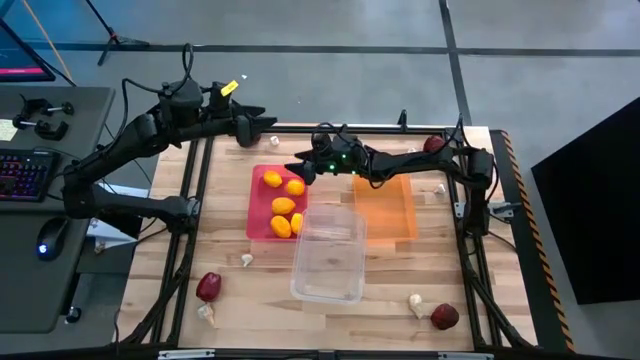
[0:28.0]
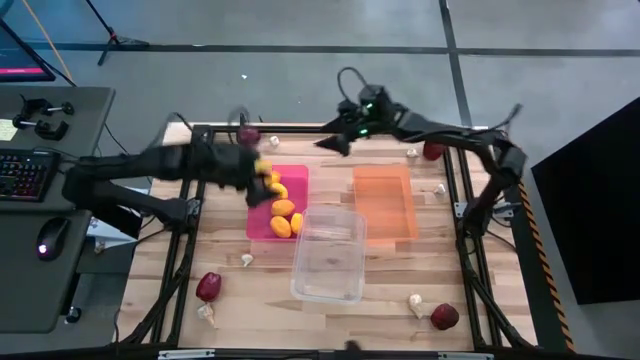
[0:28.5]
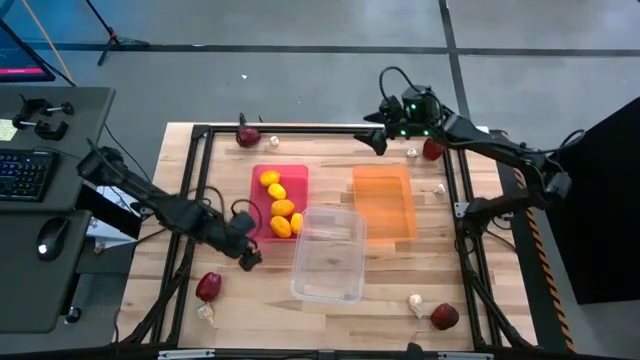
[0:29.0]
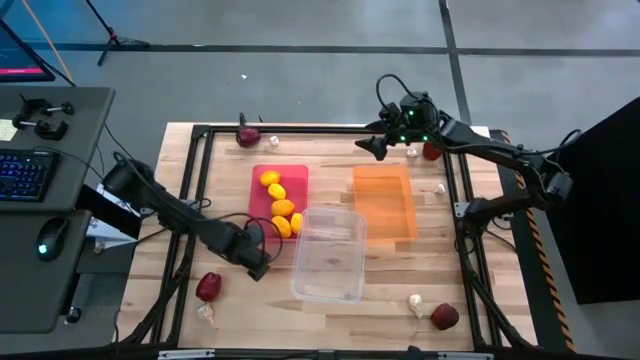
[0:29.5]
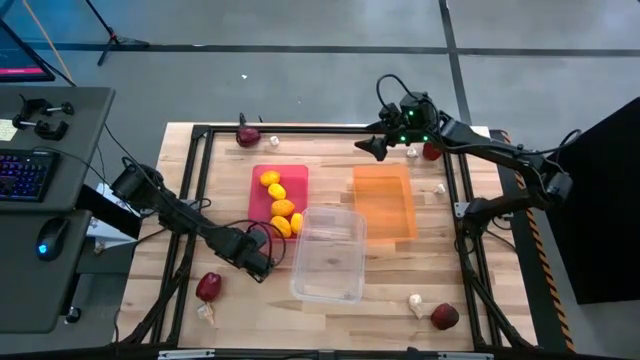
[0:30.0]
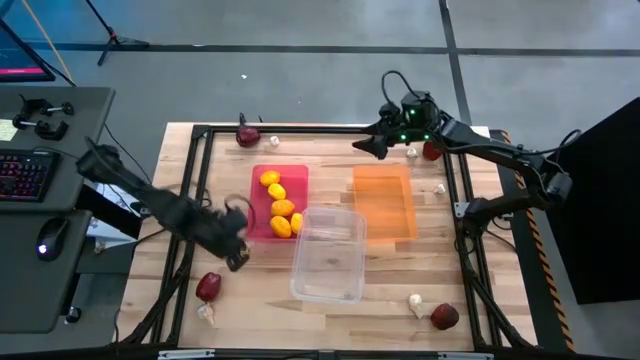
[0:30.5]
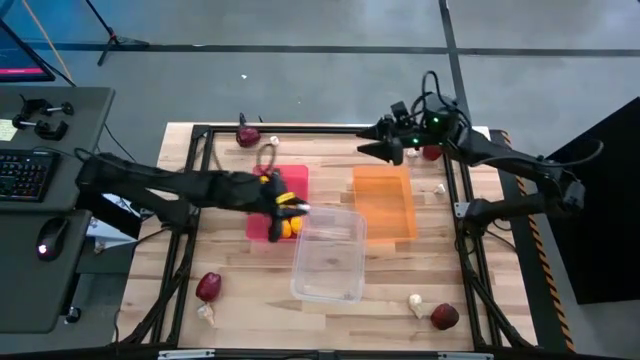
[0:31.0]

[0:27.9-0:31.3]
Task: Sort produce into baskets
Put the garlic into the transparent bin

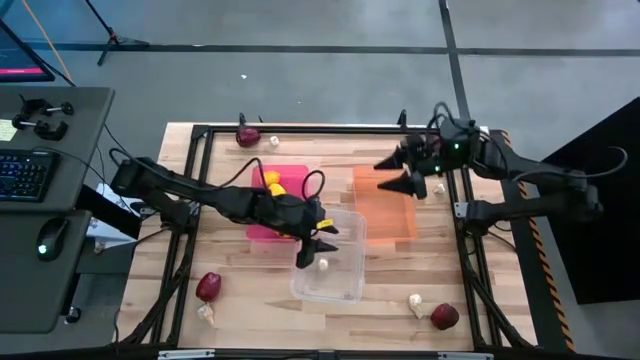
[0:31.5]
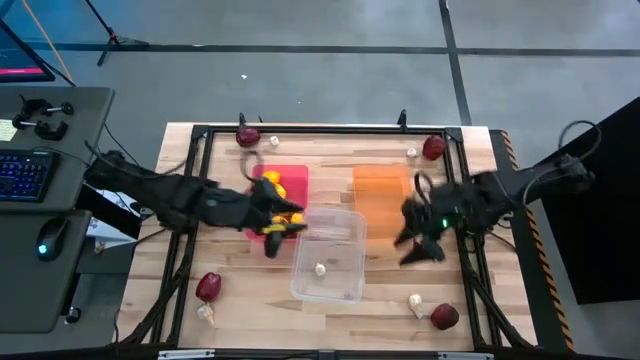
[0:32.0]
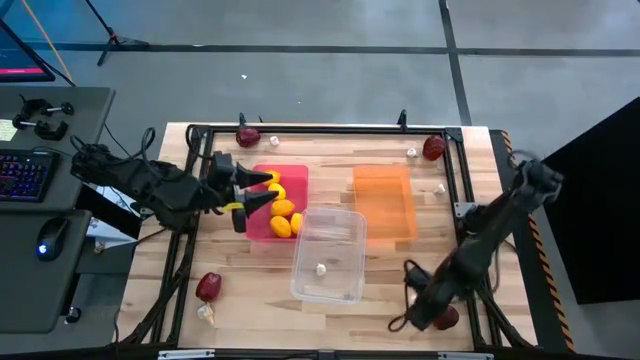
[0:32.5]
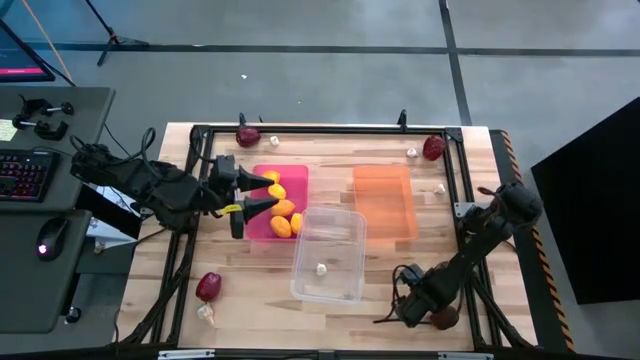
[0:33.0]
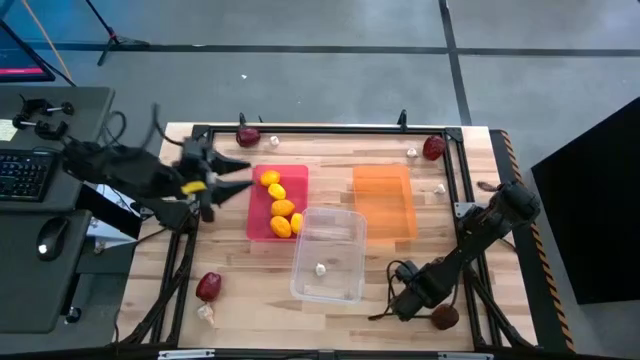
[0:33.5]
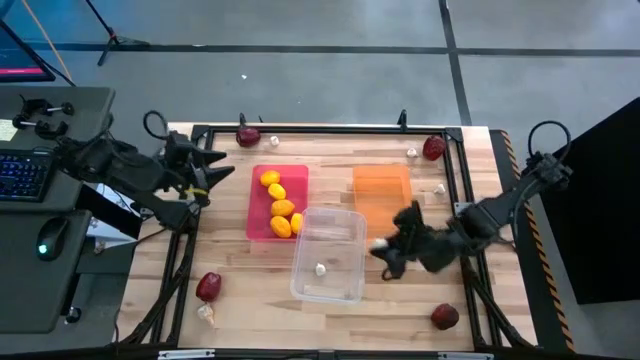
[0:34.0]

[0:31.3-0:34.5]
Put the garlic into the transparent bin

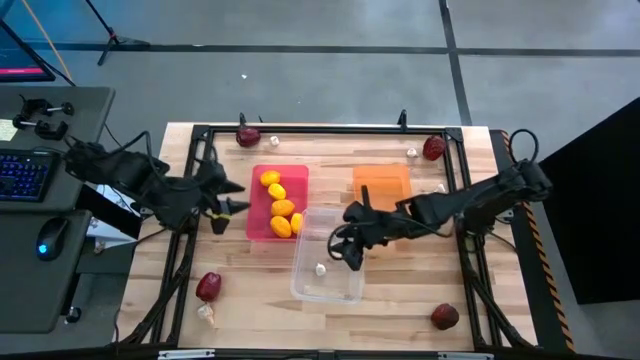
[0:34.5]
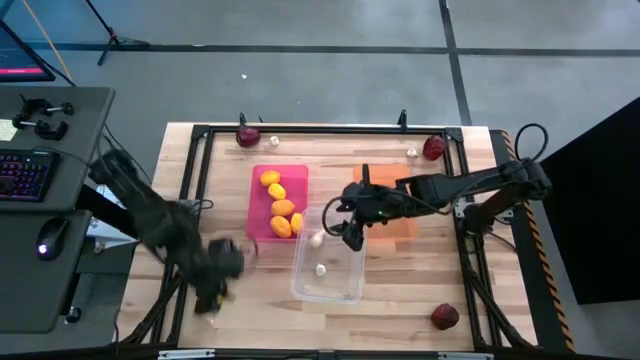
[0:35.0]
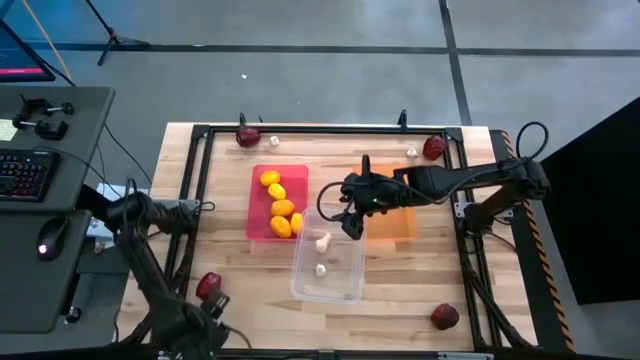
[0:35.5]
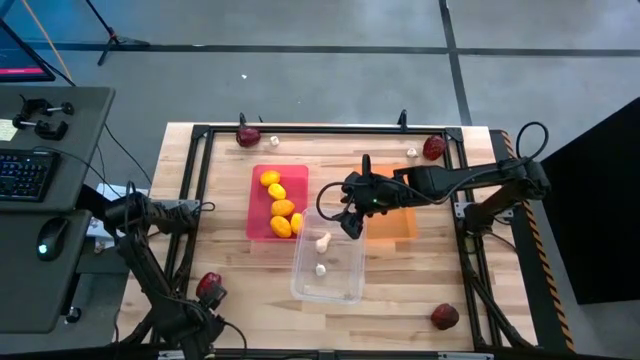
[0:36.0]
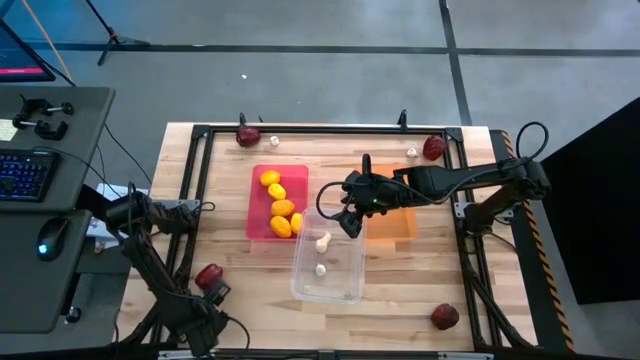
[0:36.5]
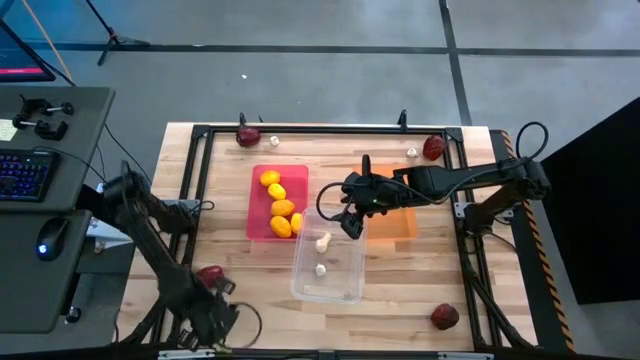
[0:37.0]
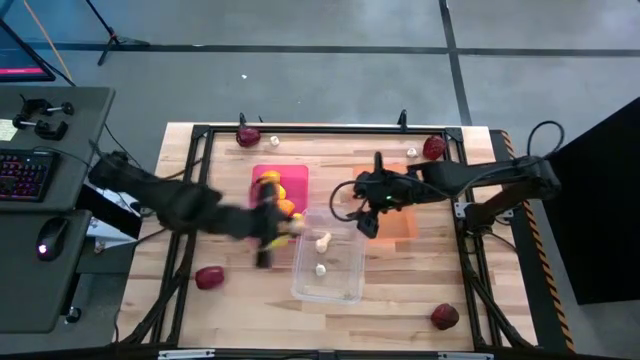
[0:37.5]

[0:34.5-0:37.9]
Put the garlic into the transparent bin

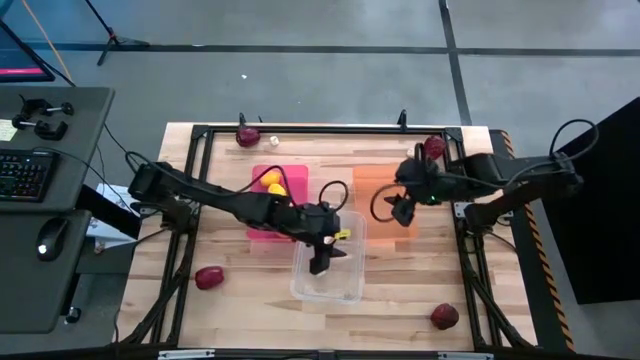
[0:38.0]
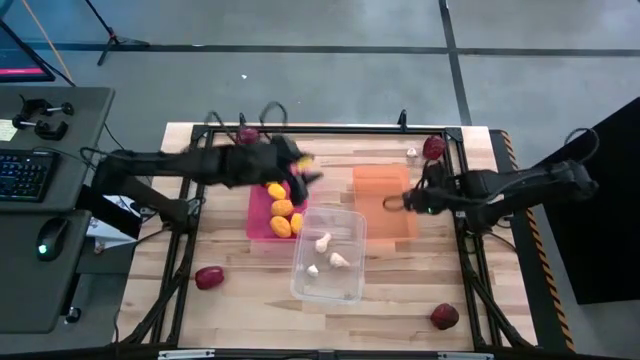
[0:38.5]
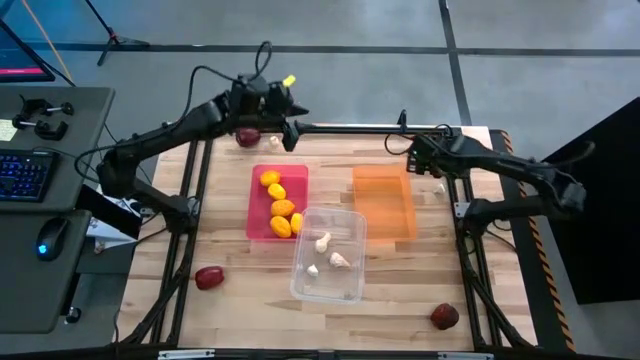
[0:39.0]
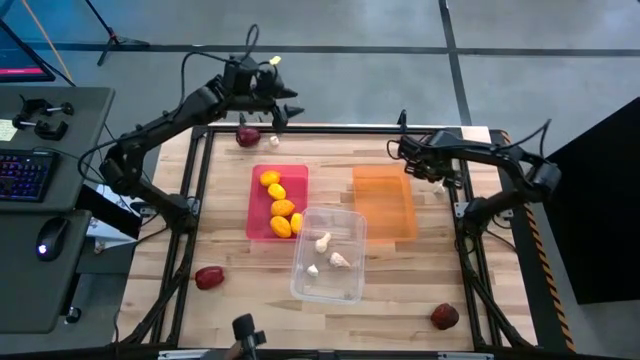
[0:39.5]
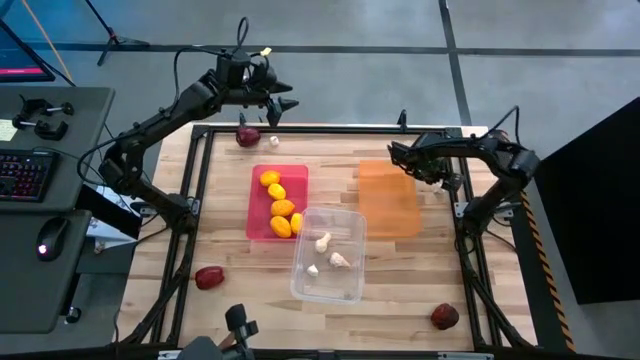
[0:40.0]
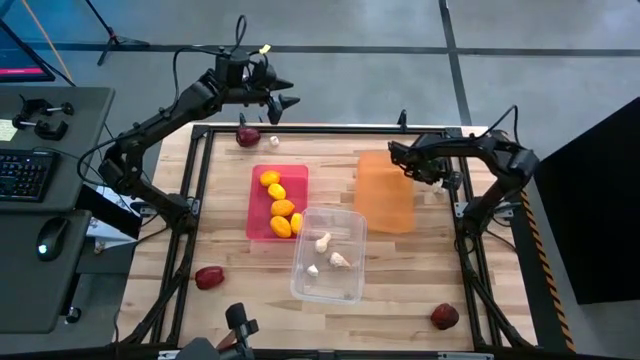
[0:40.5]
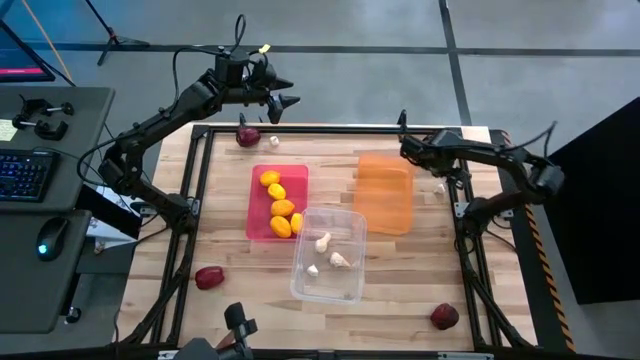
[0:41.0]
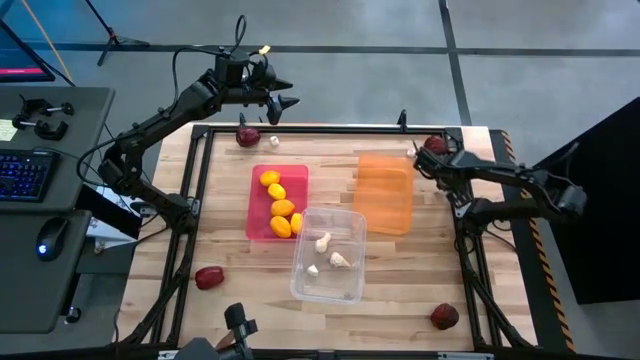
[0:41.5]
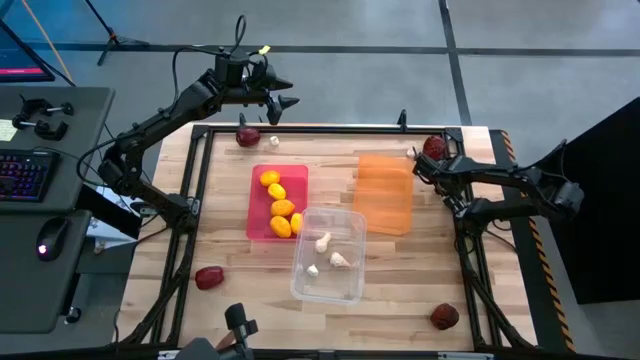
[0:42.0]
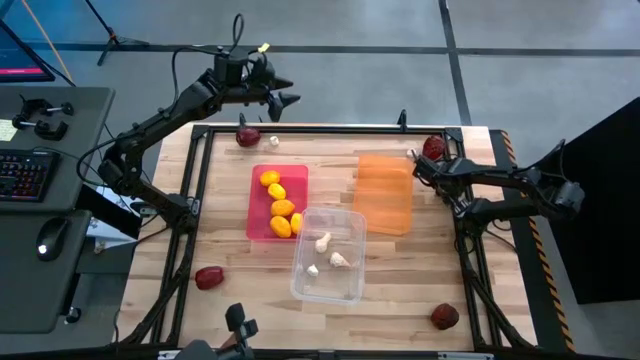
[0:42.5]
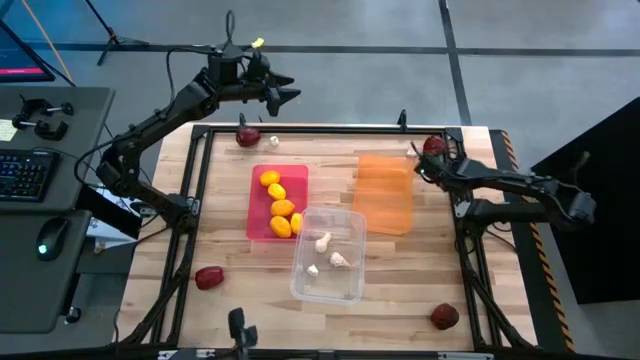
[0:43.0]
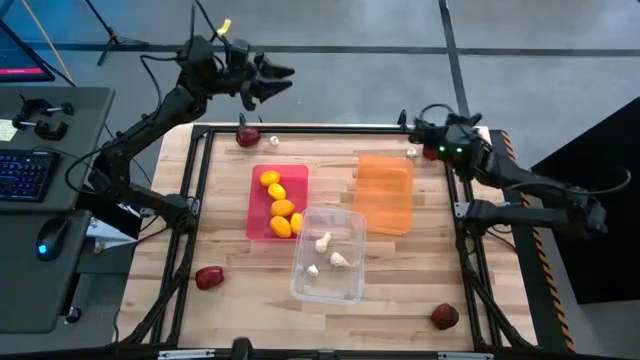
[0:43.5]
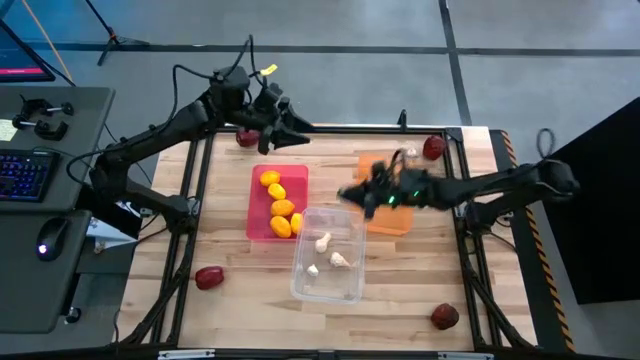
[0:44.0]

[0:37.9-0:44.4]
Put the garlic into the transparent bin

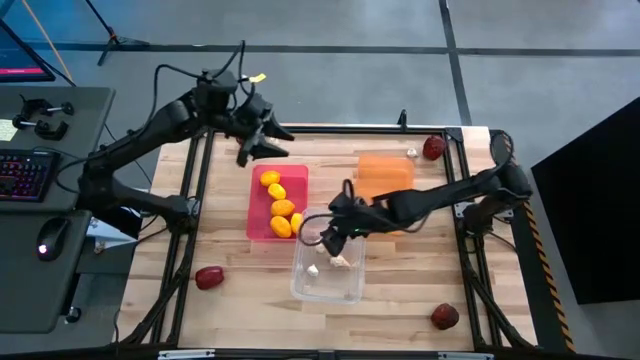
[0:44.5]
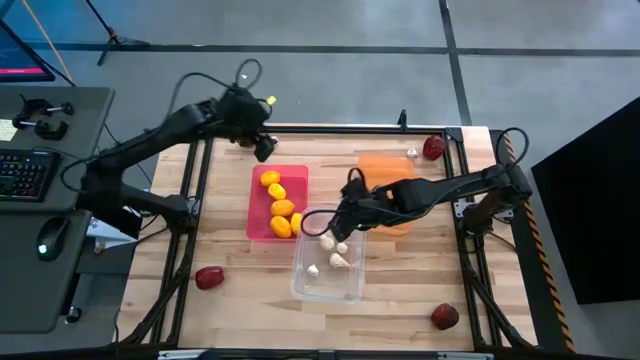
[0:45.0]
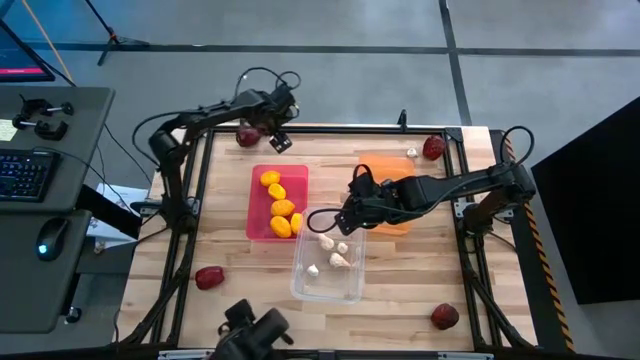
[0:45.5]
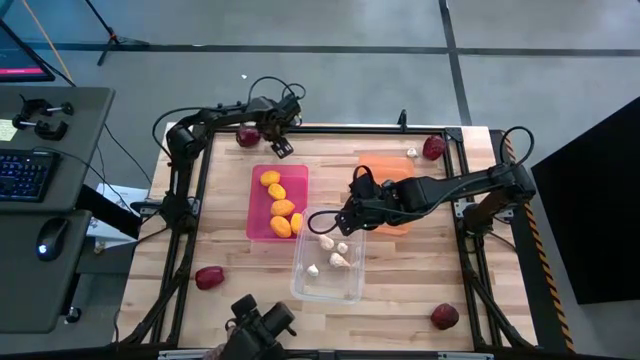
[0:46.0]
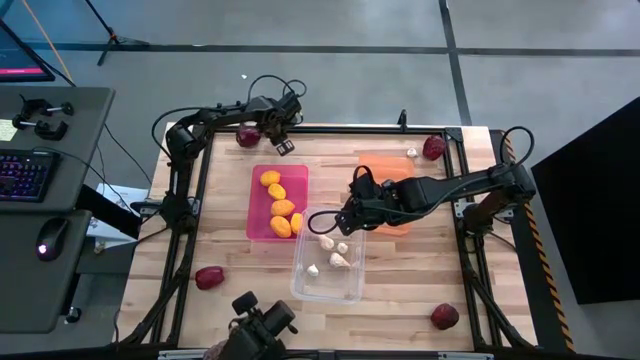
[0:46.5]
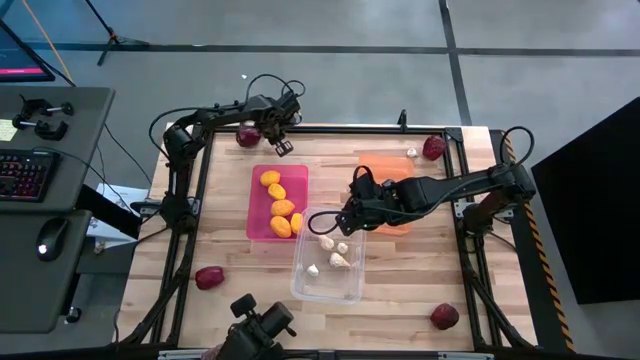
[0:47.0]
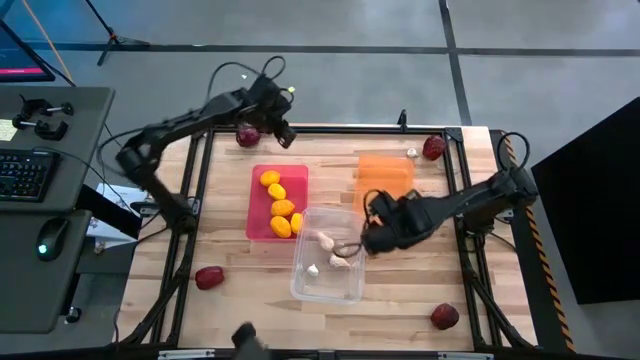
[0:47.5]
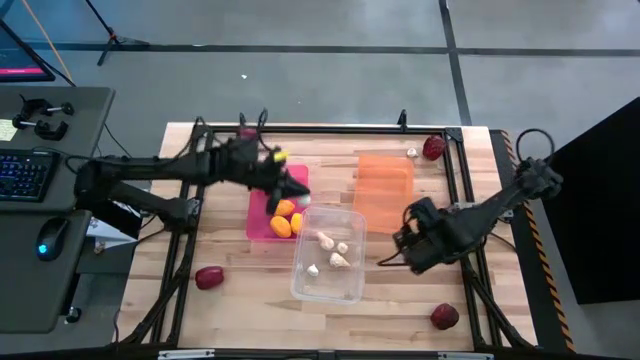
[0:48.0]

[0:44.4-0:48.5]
Put the garlic into the transparent bin

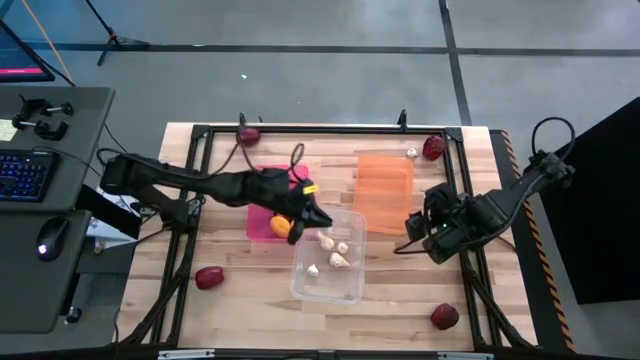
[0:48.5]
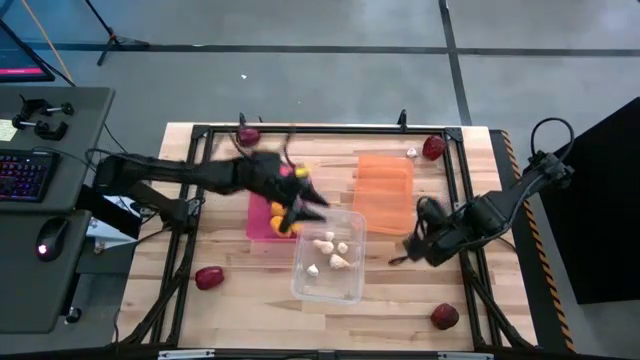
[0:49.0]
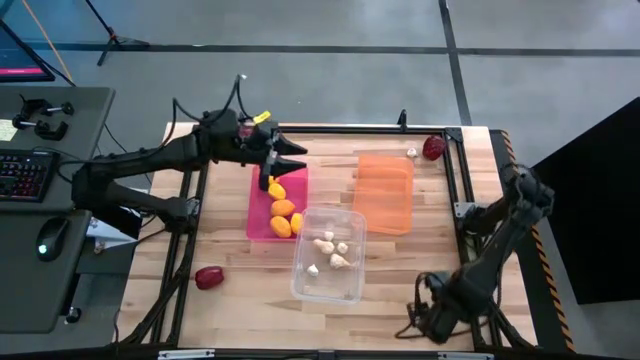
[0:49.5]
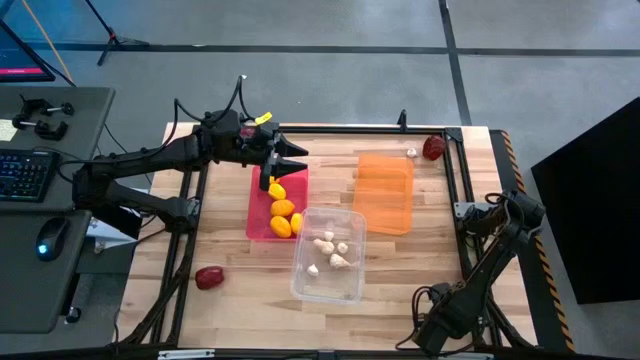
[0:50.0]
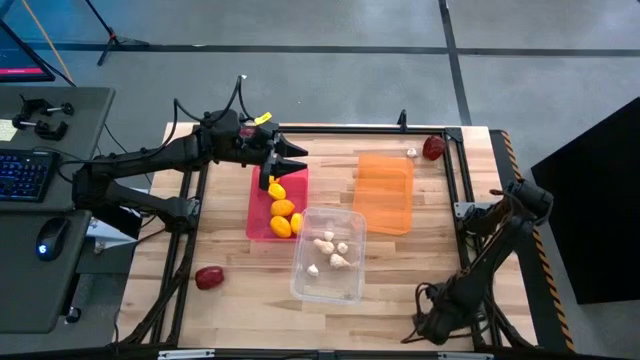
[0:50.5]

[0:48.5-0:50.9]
Put the apple into the orange bin
